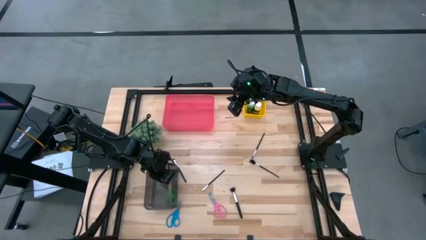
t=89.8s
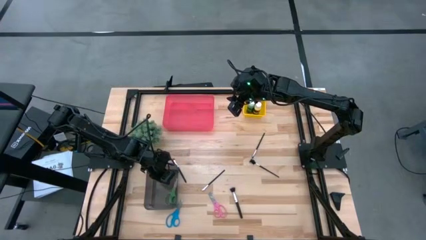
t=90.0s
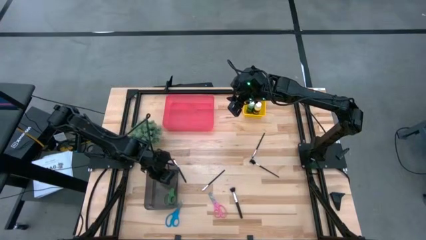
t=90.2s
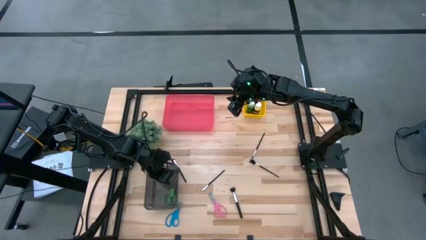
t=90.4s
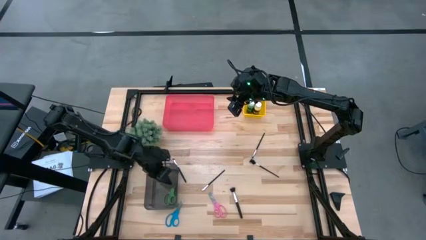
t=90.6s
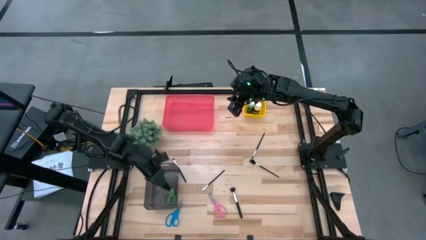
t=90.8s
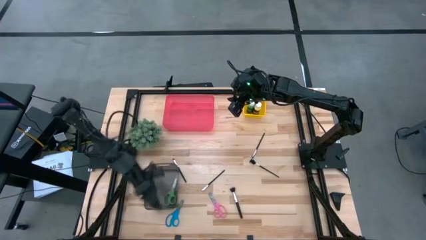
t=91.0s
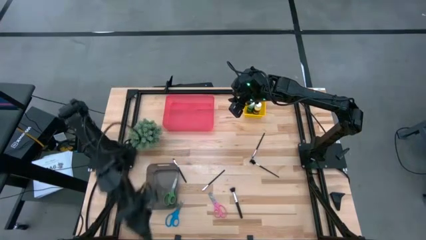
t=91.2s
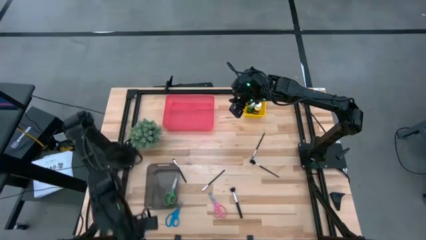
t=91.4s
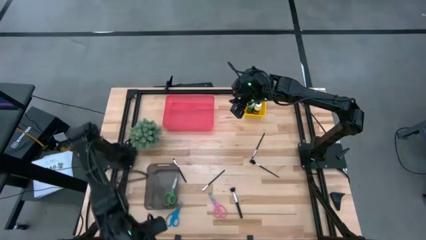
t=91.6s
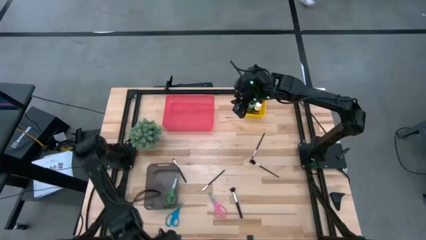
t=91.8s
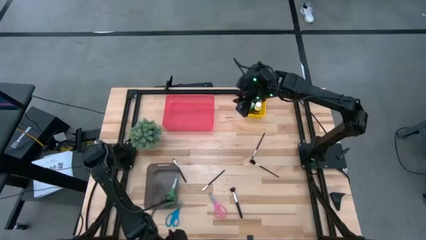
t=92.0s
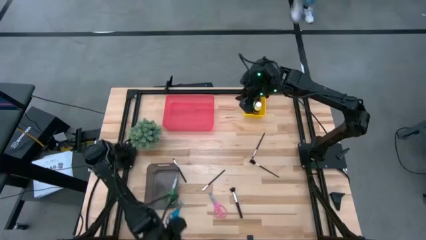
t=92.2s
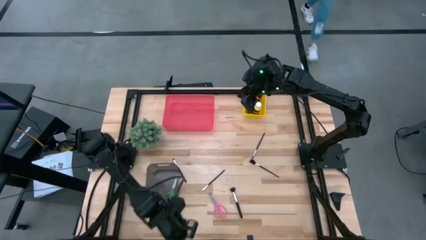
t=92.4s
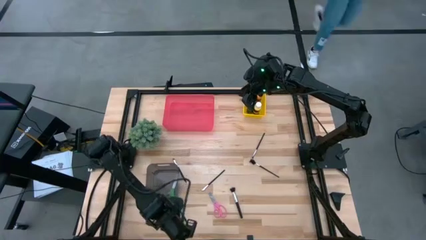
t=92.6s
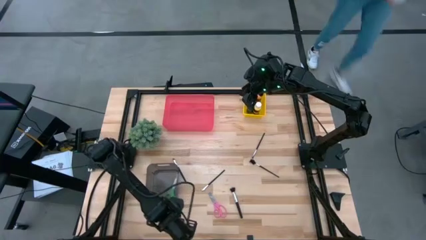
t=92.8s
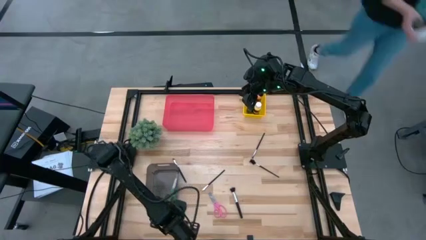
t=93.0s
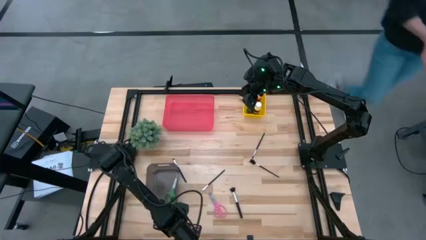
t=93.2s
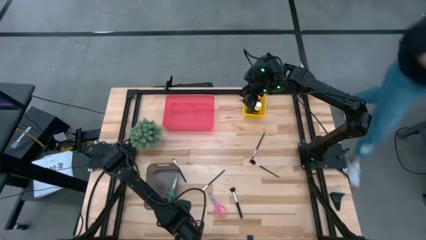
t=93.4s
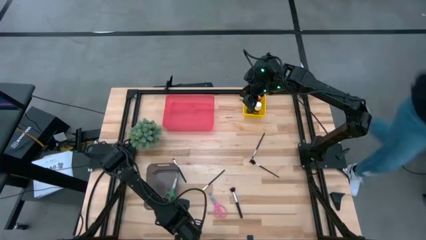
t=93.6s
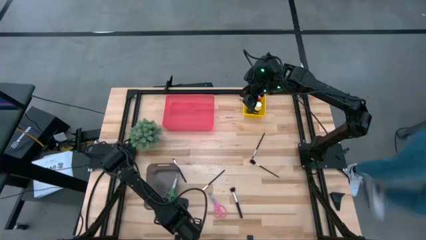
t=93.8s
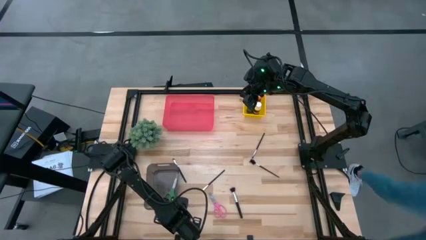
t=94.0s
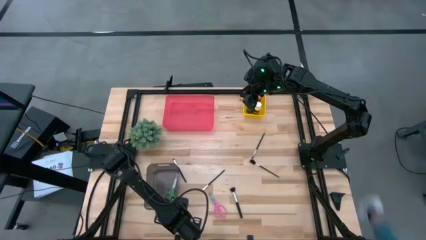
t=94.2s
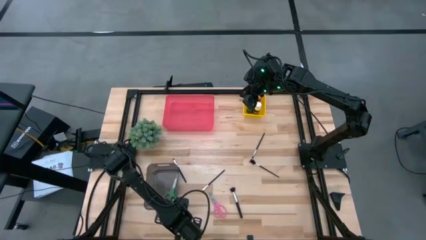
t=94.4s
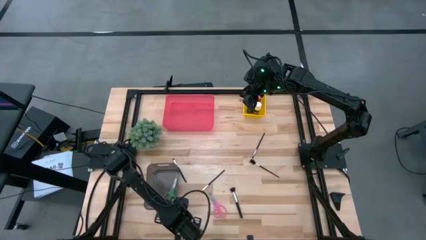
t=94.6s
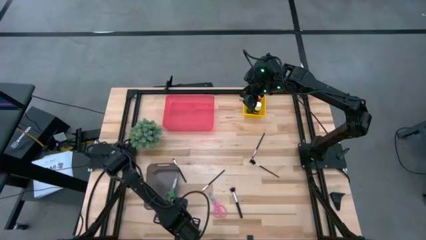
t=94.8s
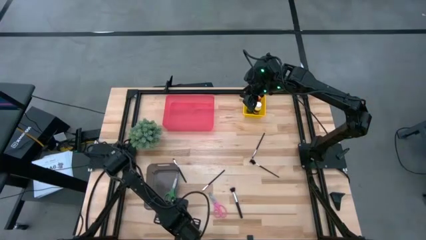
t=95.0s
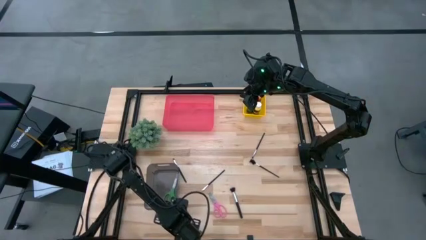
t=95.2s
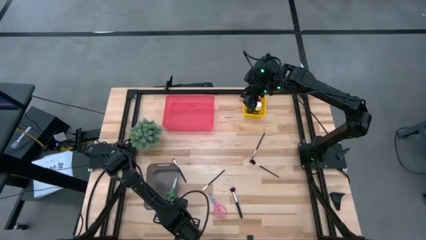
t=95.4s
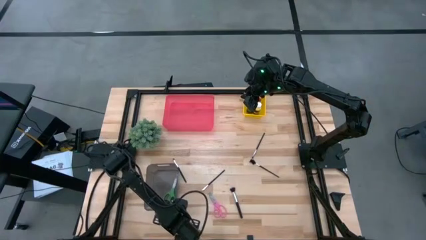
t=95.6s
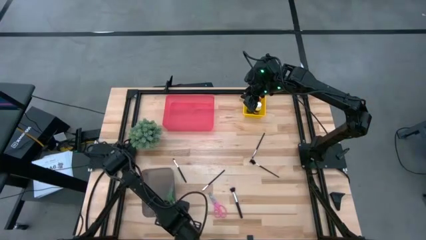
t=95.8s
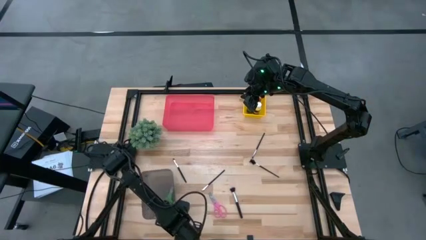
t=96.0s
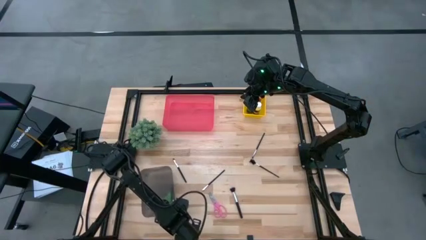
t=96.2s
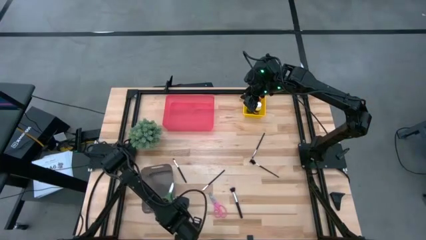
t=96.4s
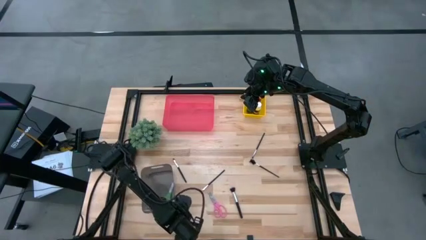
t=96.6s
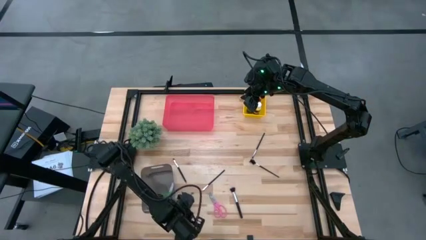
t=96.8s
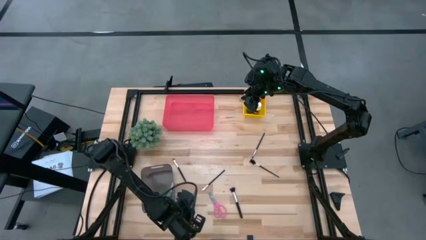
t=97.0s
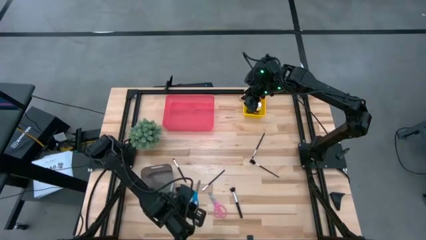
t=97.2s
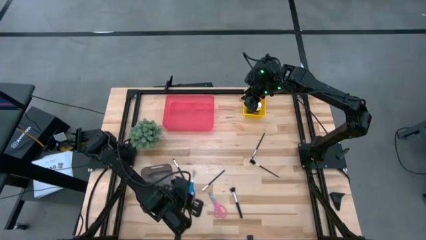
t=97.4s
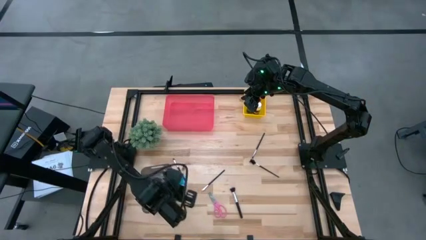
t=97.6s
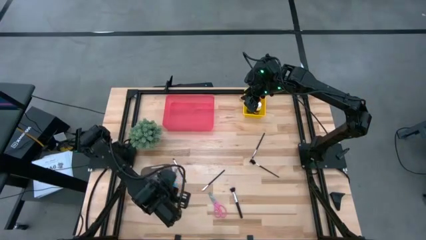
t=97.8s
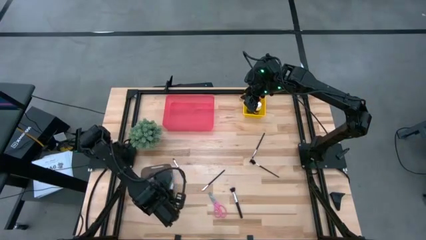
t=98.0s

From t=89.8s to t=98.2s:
Task: Pick & Place Paint Supplies
Put the blue scissors into the black bin

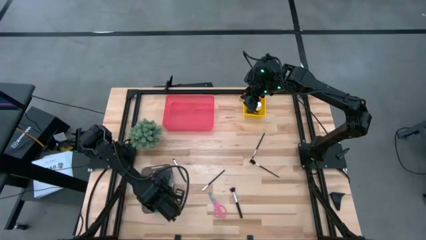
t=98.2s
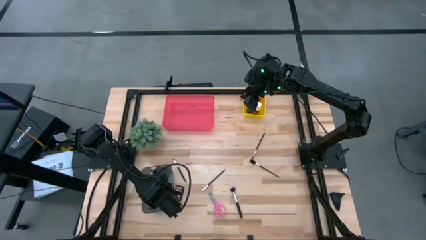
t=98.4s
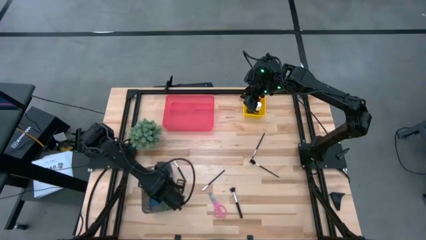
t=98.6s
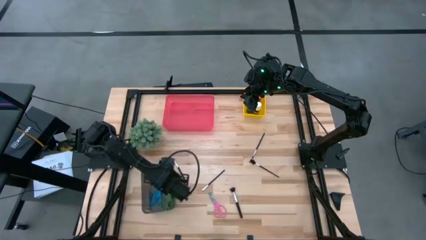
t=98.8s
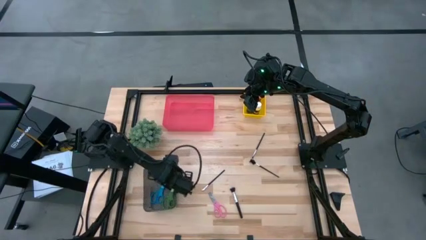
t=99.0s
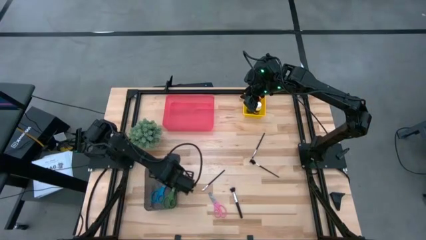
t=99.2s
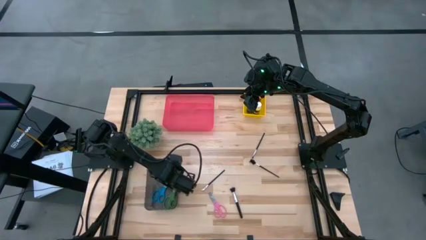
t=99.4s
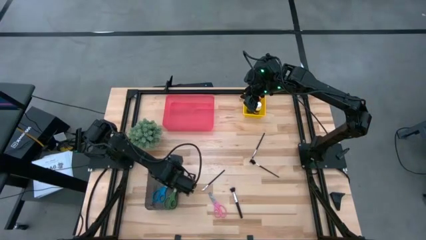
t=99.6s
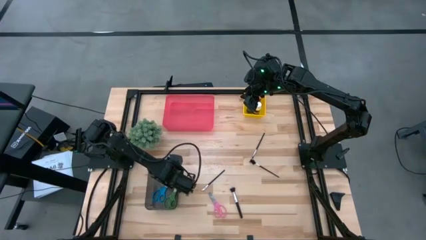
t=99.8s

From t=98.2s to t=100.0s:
Adjust the bin on the table

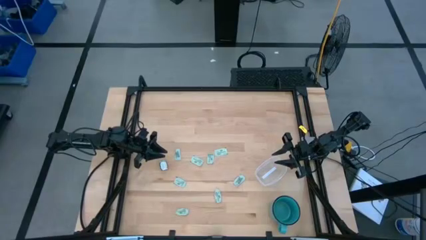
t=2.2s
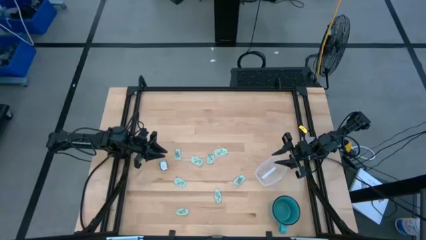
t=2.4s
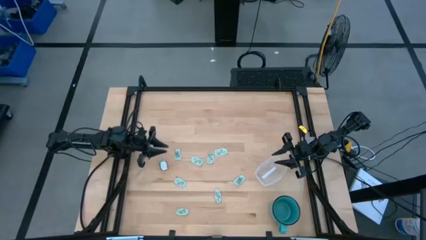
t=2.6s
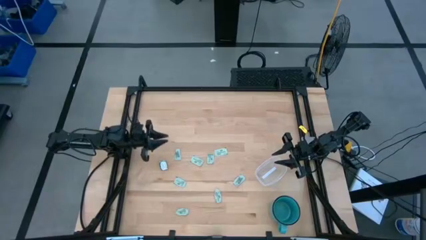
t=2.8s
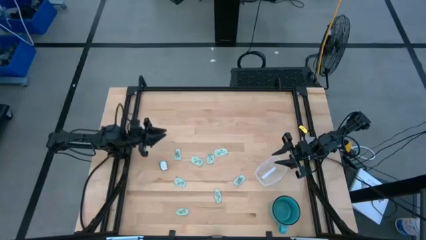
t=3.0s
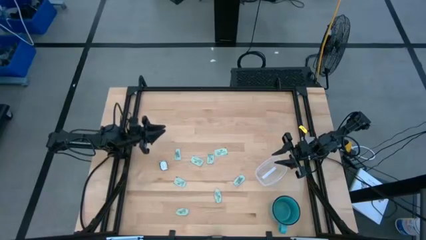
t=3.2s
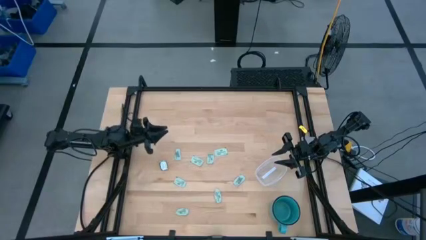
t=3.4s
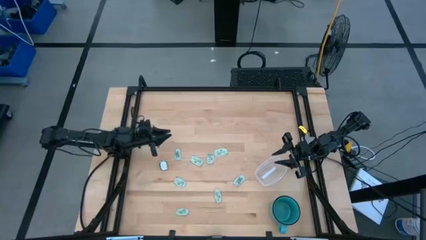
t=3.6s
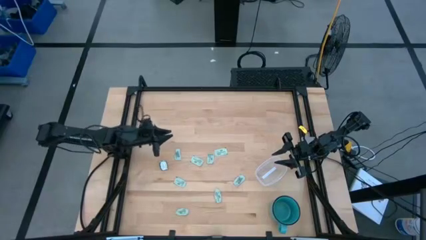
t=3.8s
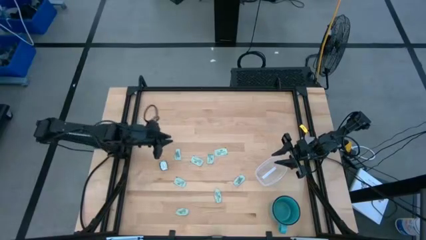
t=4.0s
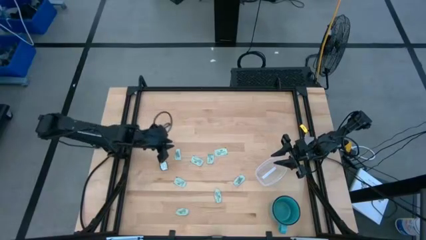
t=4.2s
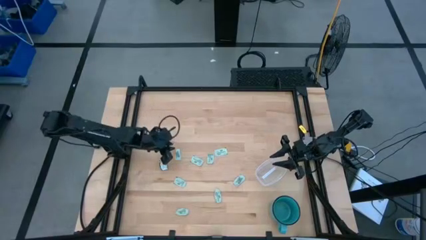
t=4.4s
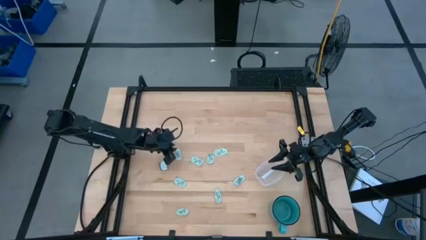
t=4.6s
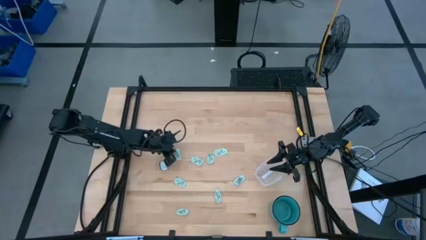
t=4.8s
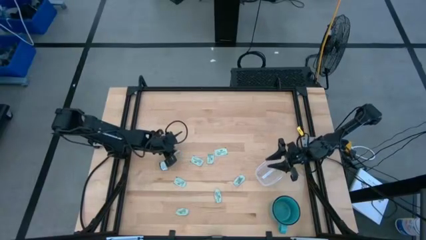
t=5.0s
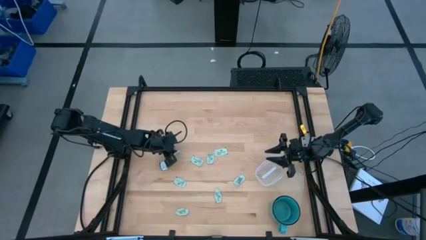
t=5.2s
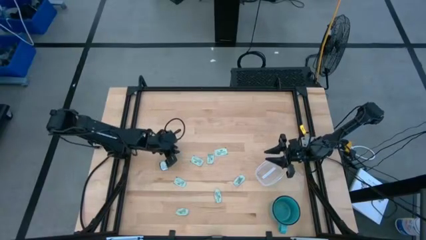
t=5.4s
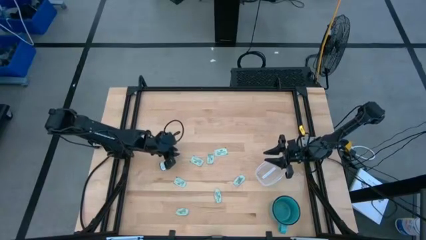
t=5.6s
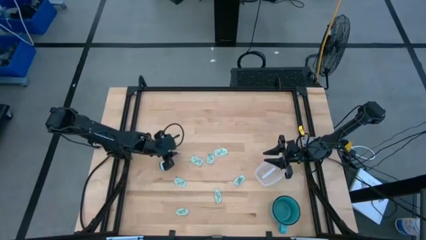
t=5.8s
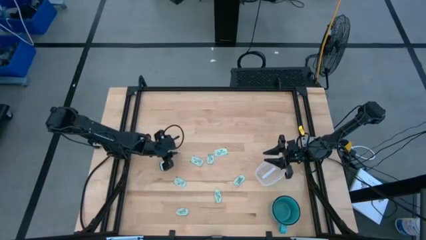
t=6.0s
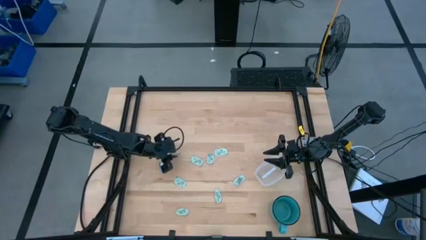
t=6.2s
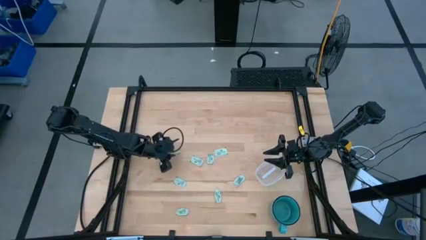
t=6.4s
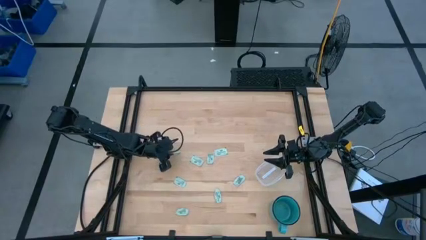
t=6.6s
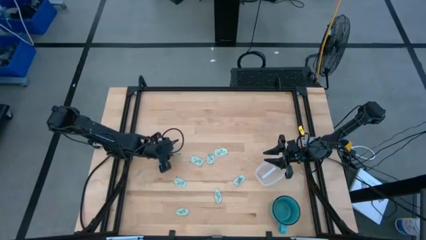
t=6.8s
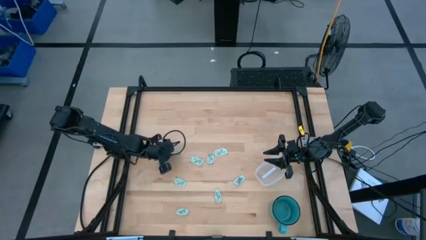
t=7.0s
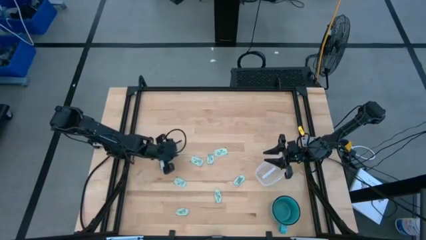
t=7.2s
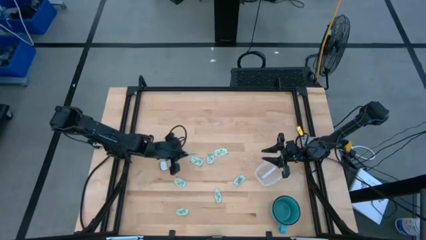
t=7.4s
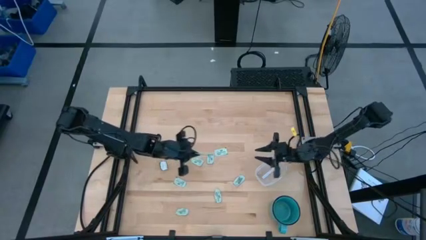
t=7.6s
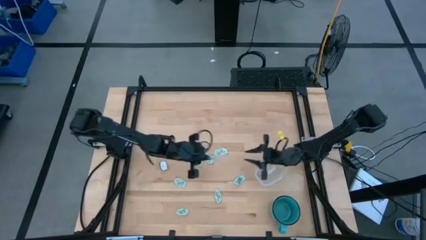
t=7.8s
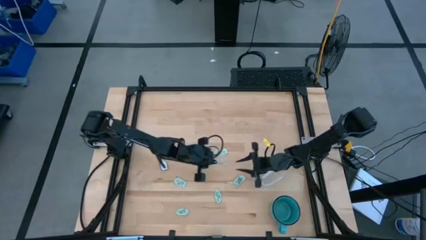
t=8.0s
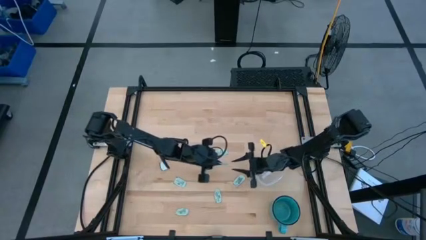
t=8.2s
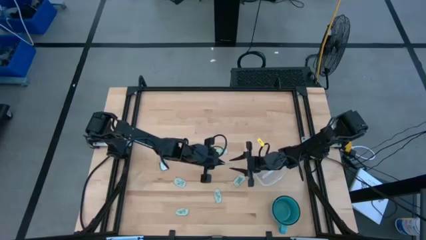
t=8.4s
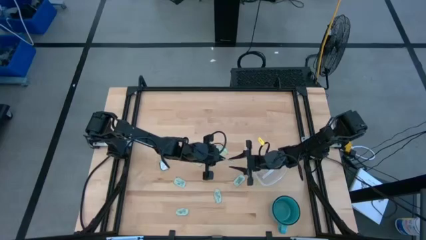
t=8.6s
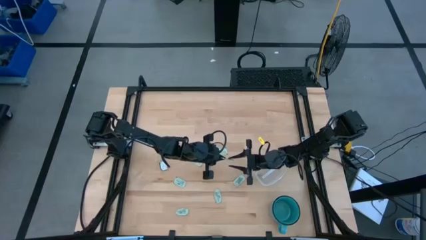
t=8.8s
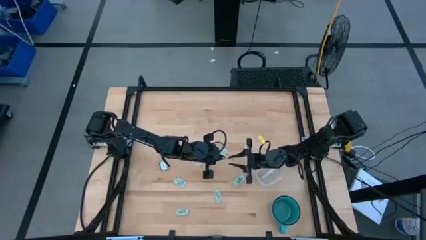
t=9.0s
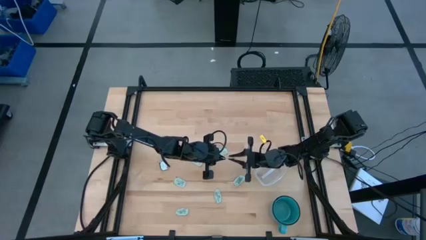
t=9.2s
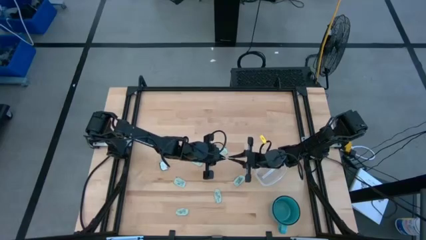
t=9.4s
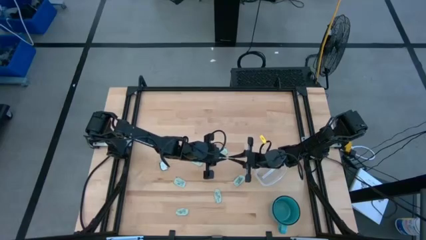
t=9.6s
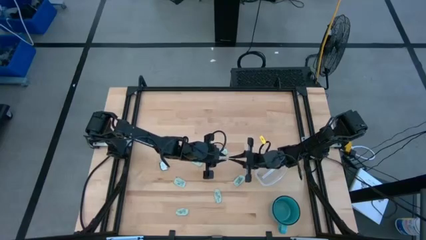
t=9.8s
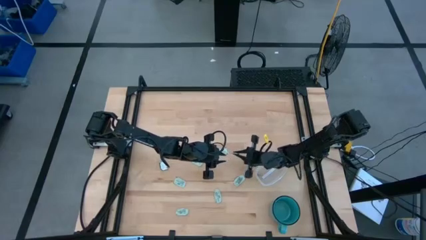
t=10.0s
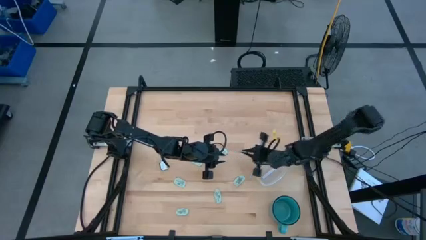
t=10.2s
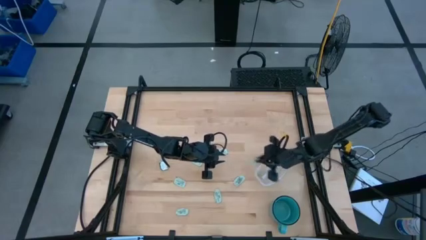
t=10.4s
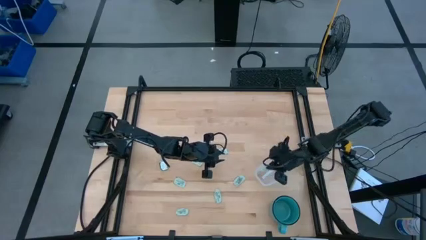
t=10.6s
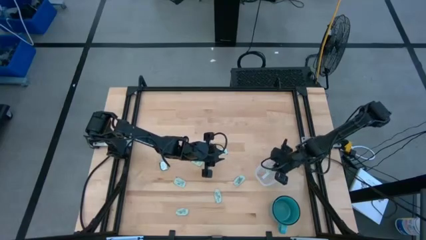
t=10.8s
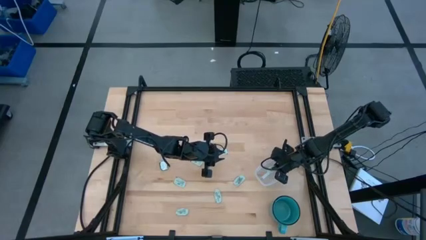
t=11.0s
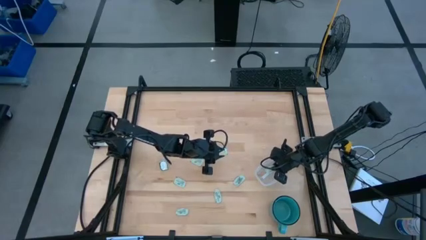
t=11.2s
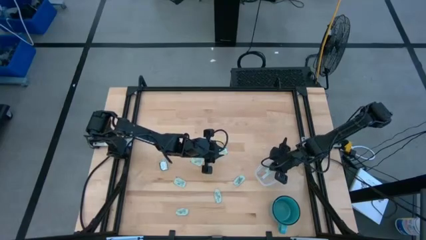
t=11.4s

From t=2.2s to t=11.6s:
Task: Pick and place Stevia / Truvia into bins
Put the stevia packet into the bin
